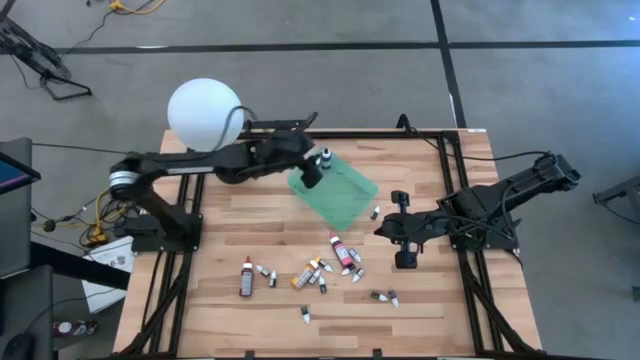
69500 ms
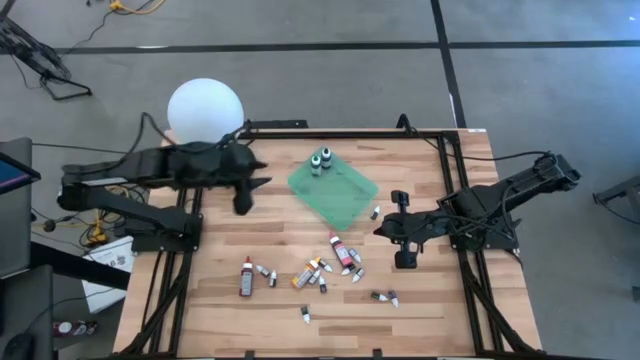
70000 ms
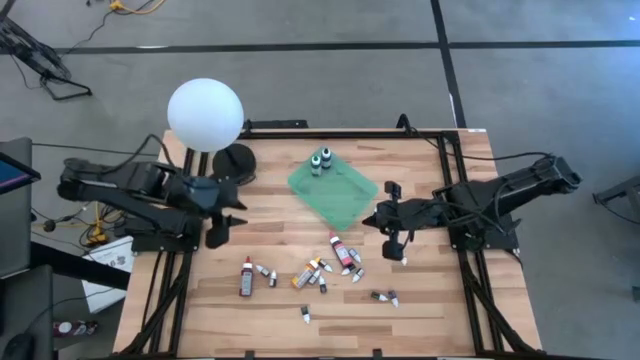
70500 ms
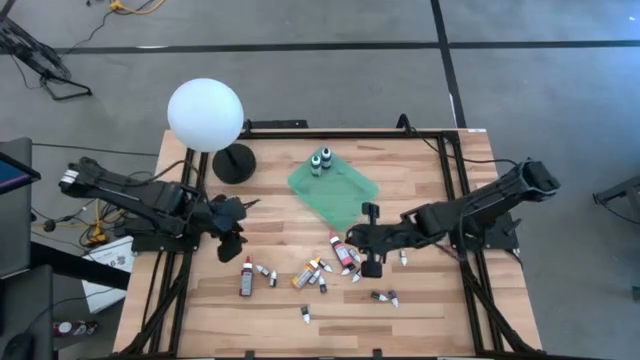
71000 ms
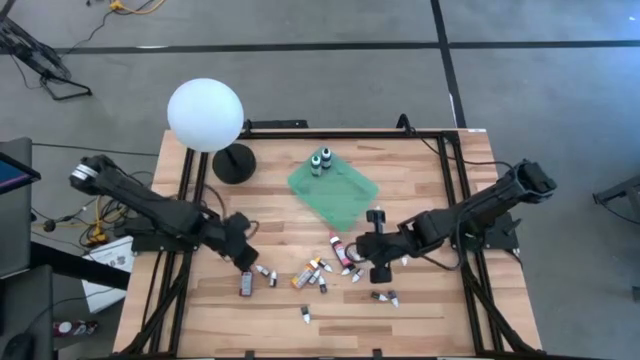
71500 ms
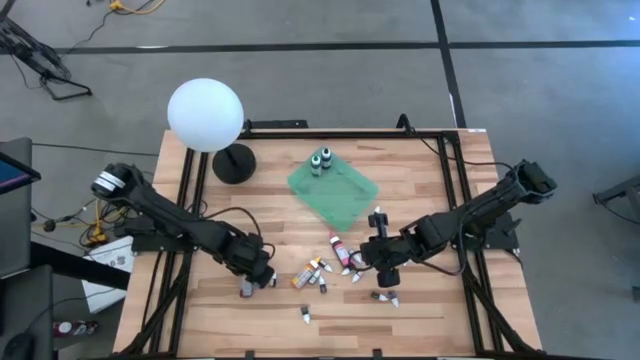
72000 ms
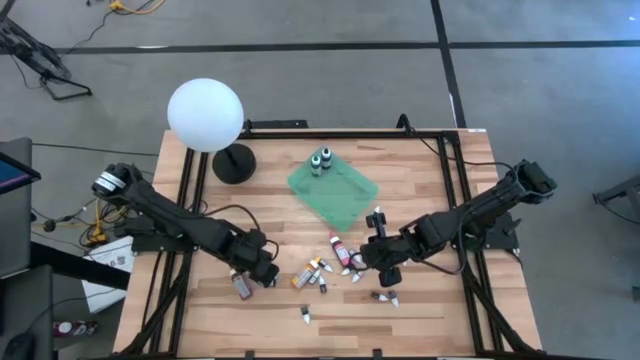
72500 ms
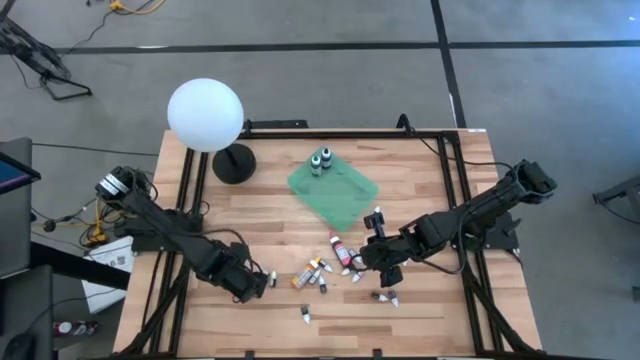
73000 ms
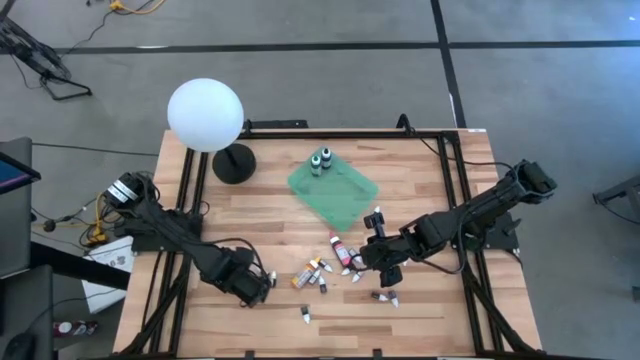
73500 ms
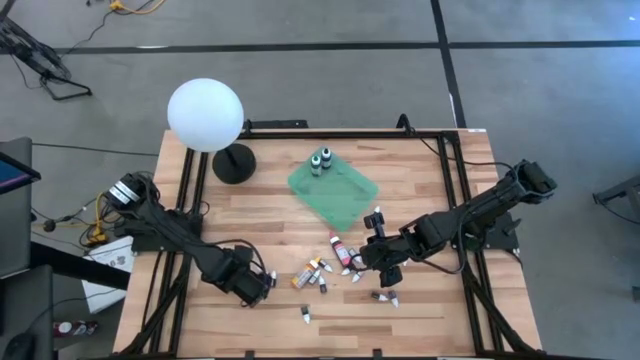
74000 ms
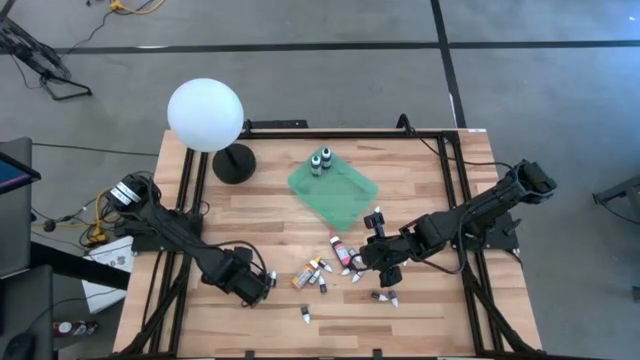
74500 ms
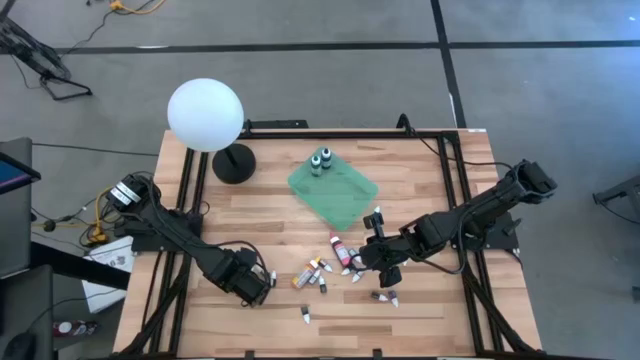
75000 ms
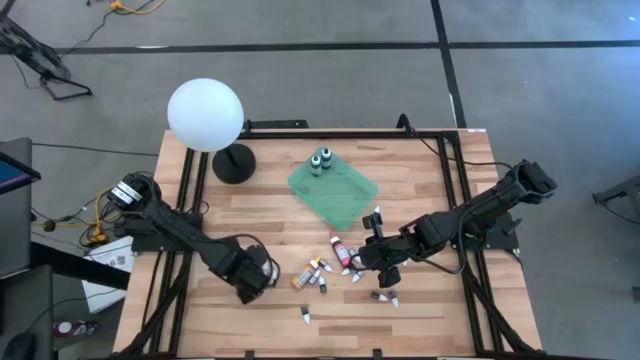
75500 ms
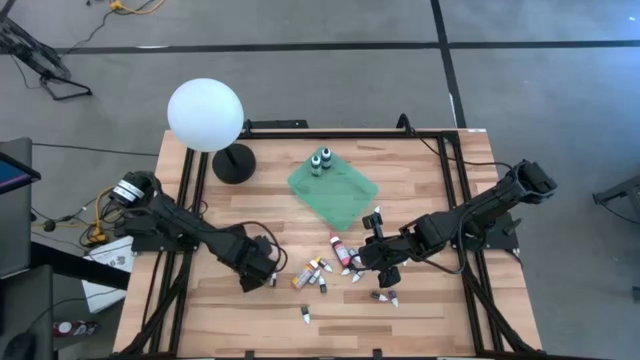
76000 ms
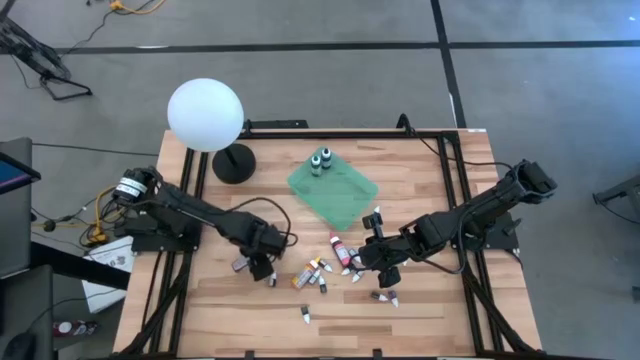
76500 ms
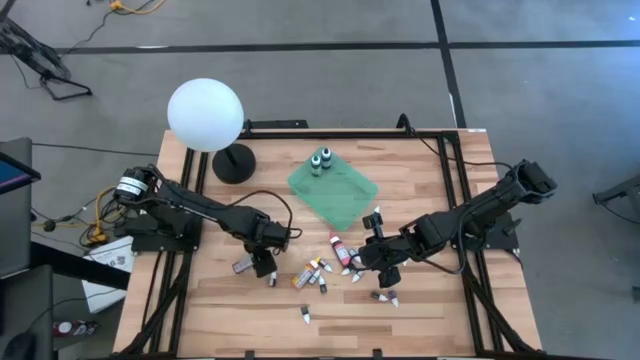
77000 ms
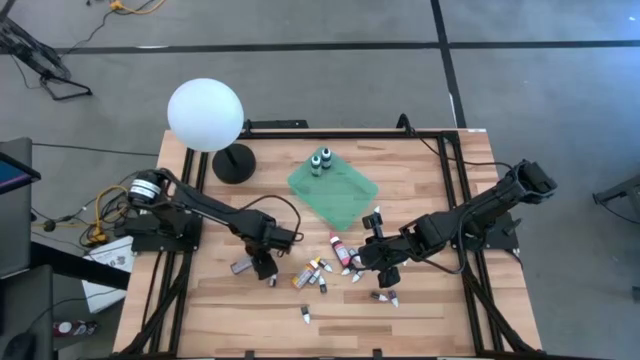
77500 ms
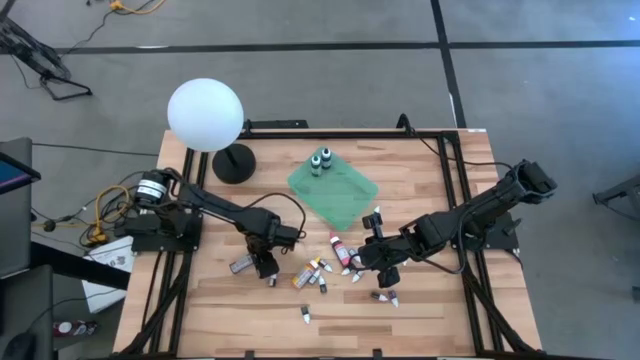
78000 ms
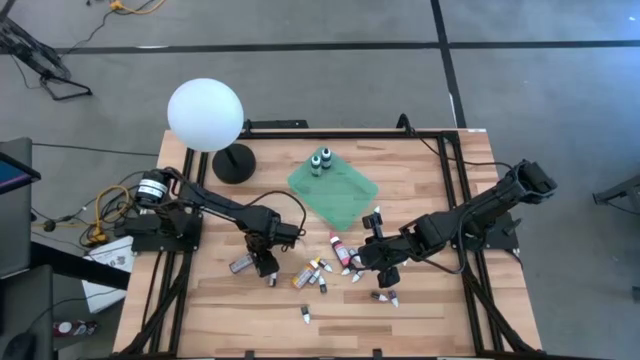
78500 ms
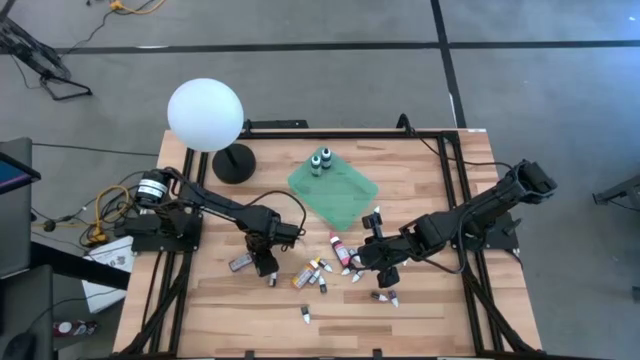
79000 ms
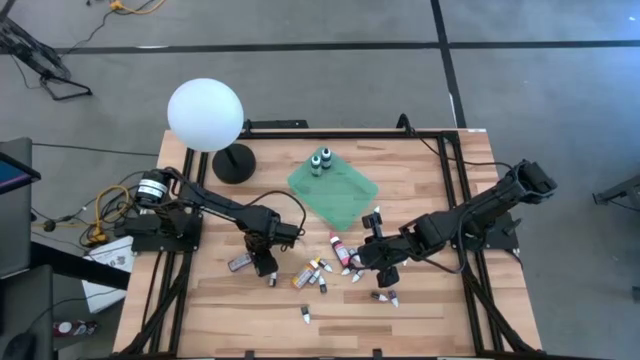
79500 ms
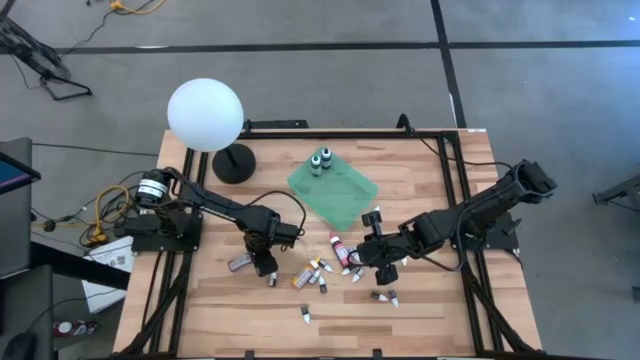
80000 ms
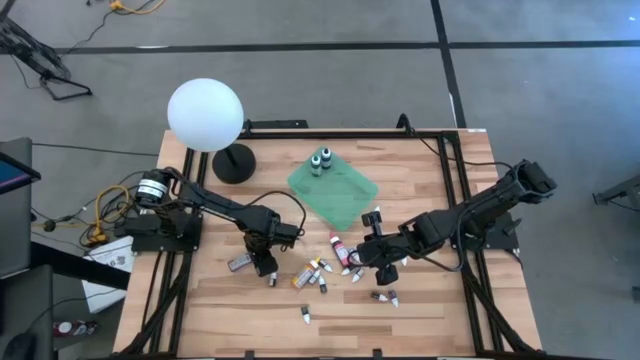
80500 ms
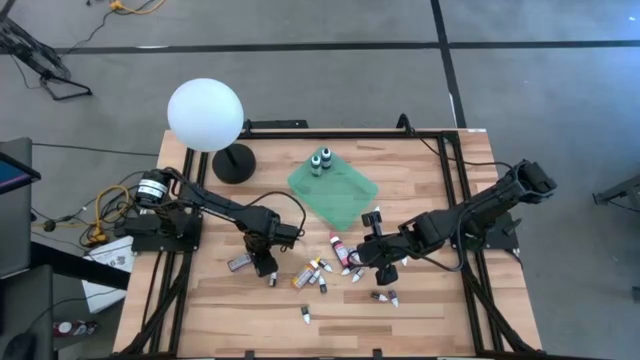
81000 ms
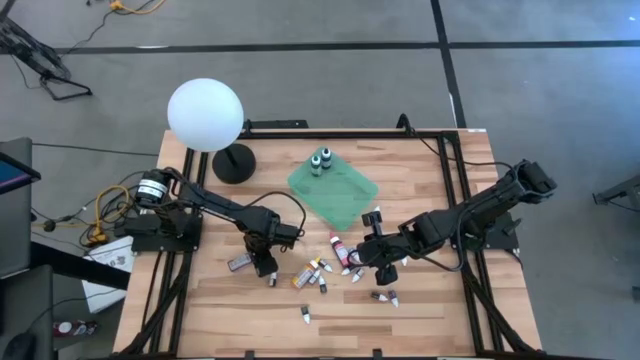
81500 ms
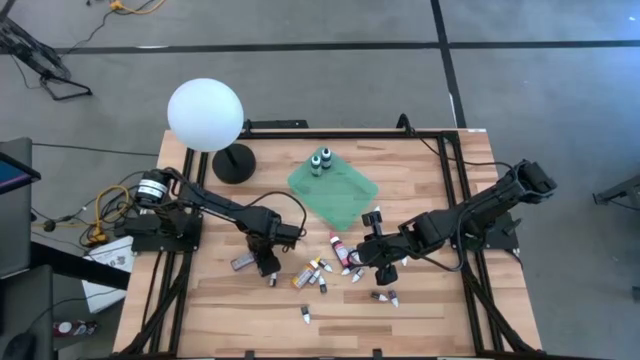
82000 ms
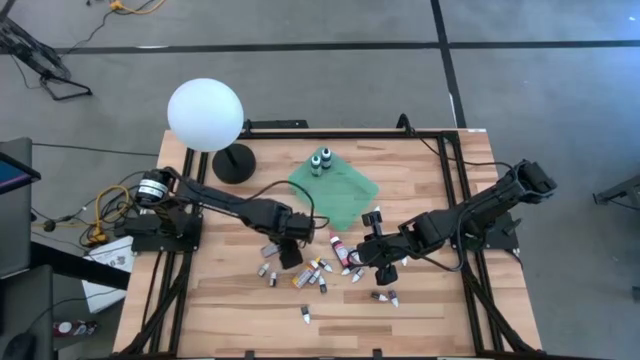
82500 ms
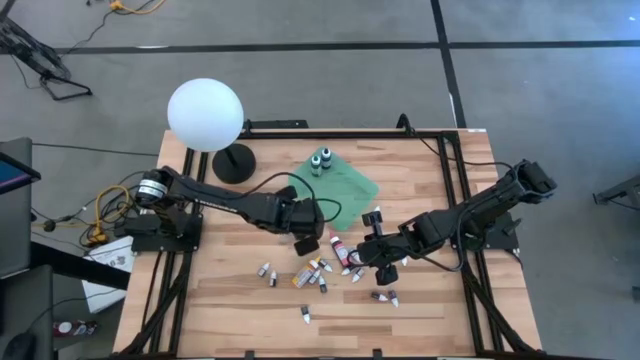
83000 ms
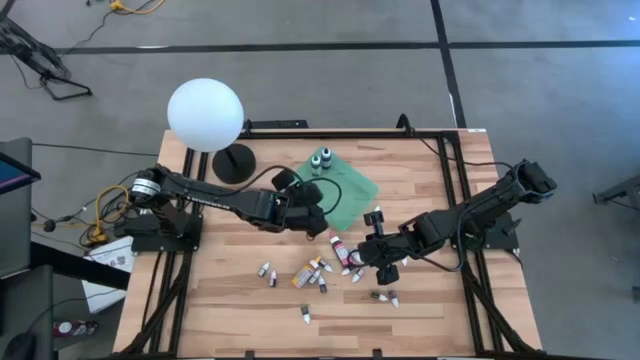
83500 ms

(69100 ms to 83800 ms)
Task: Pick & Place food coloring
Put the large red food coloring bottle into the green bin

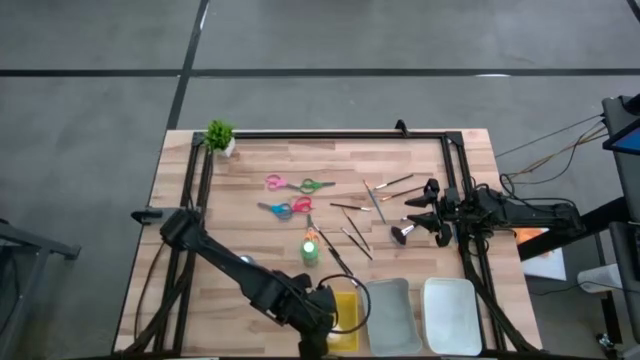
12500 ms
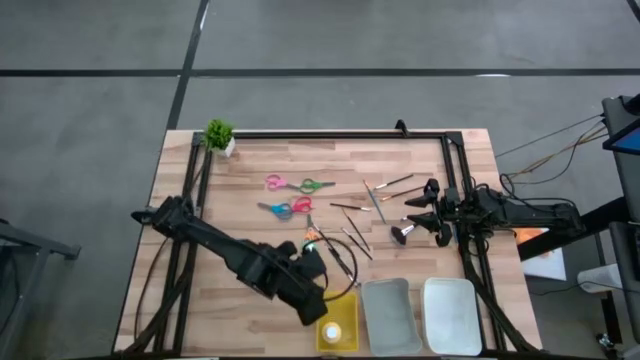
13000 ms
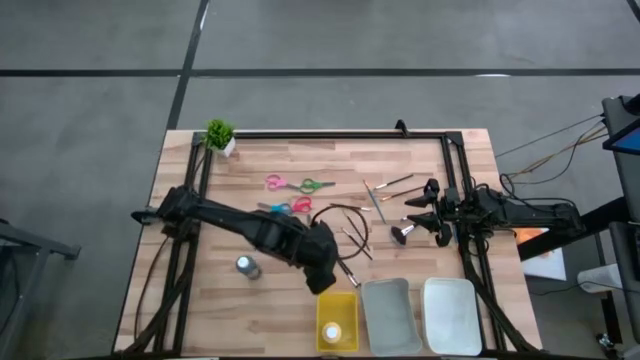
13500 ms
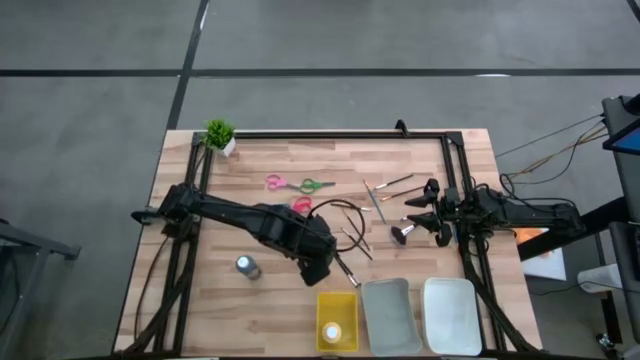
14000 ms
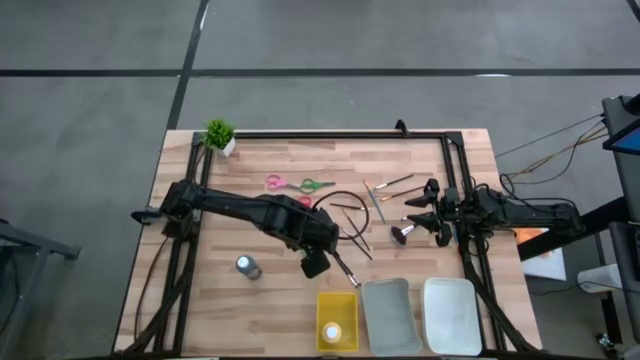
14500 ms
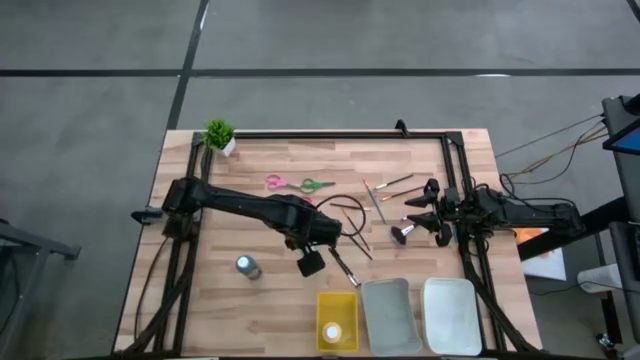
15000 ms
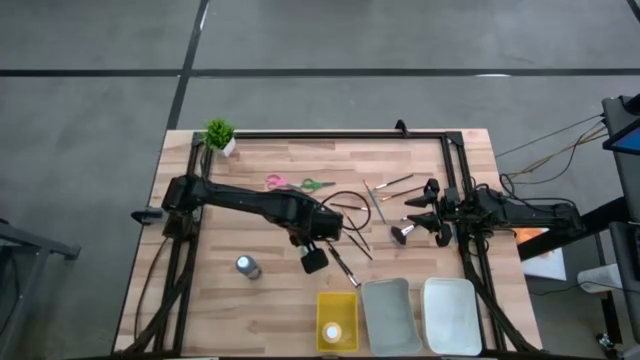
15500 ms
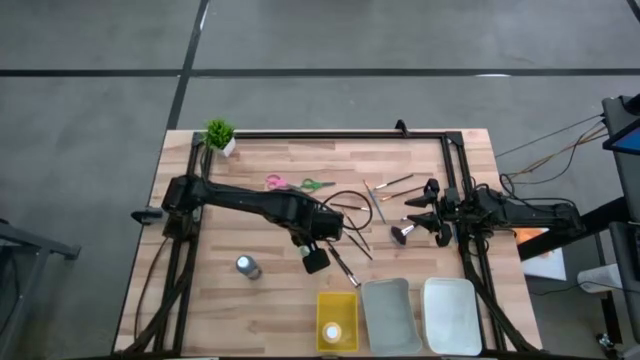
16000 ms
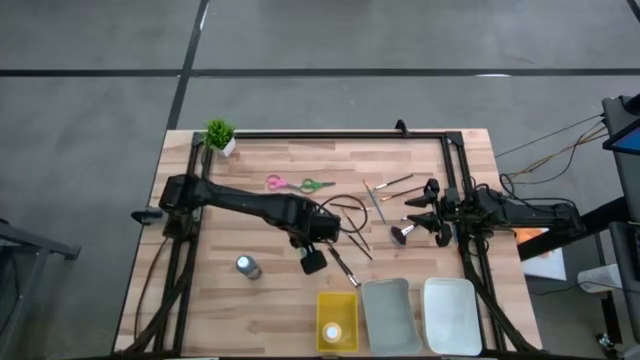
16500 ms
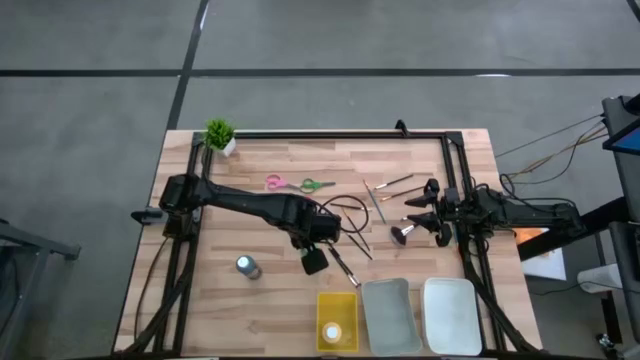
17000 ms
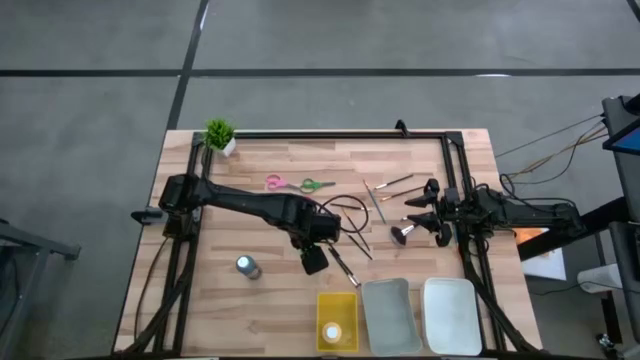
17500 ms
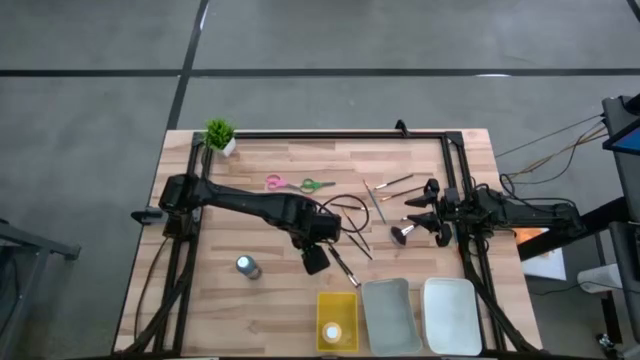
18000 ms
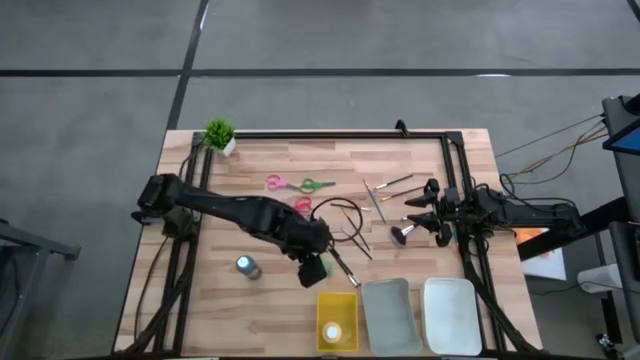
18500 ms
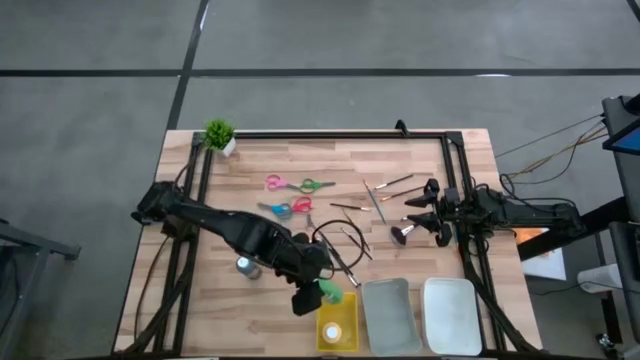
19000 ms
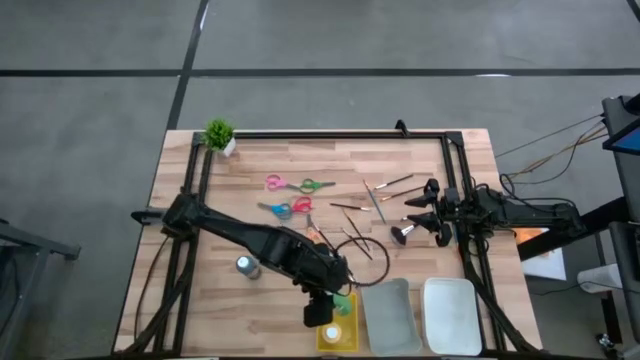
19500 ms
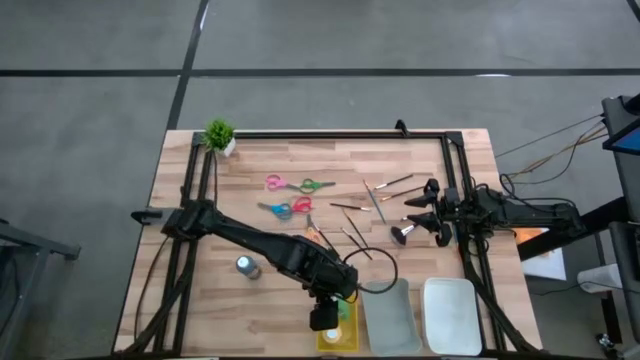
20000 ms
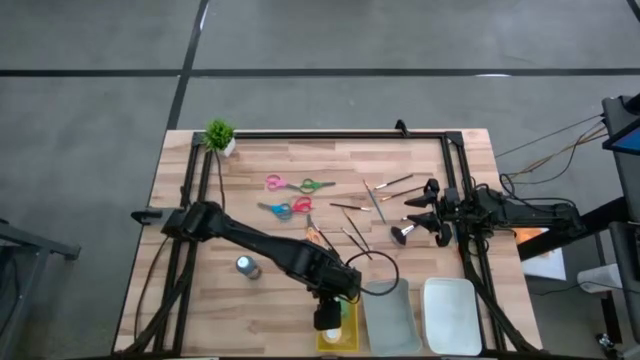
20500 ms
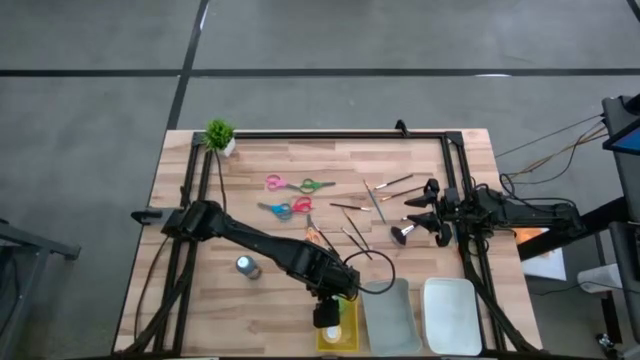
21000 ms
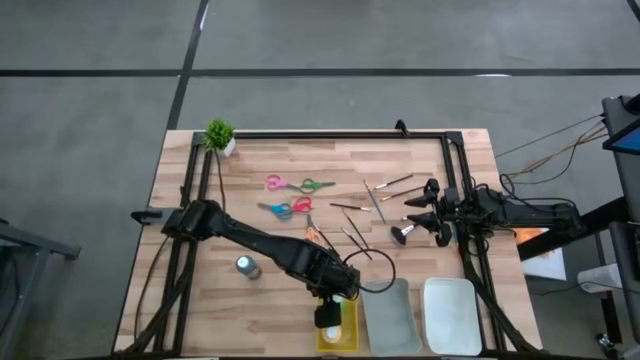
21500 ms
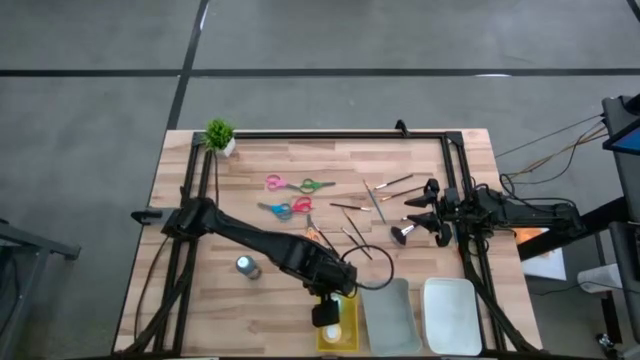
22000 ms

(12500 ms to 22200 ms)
Task: Pick & Place Paint Supplies
Put the green paint bottle into the yellow bin
